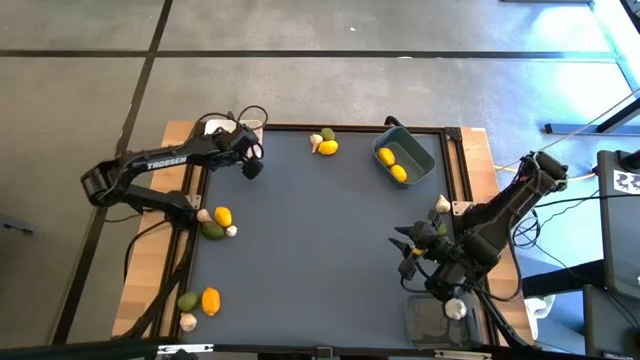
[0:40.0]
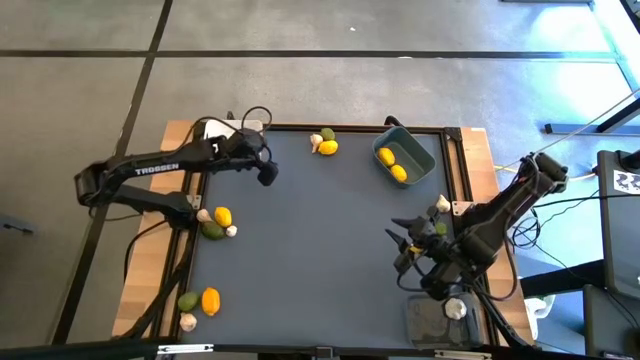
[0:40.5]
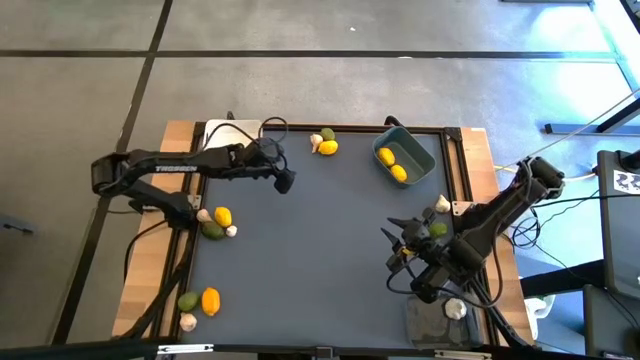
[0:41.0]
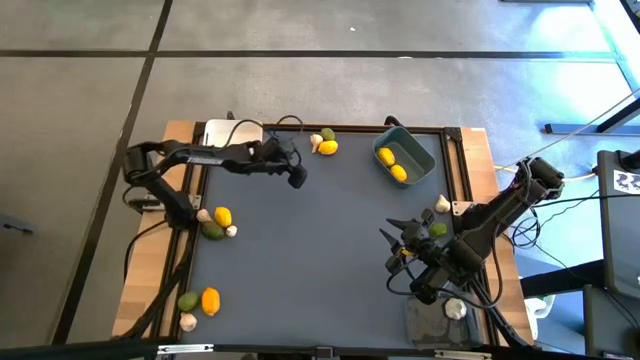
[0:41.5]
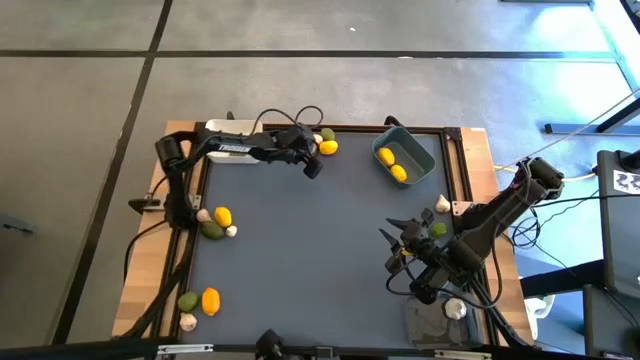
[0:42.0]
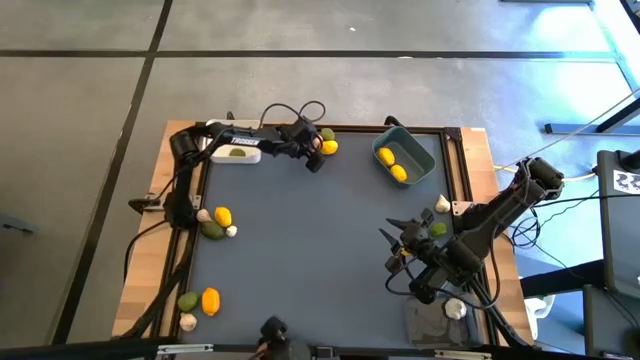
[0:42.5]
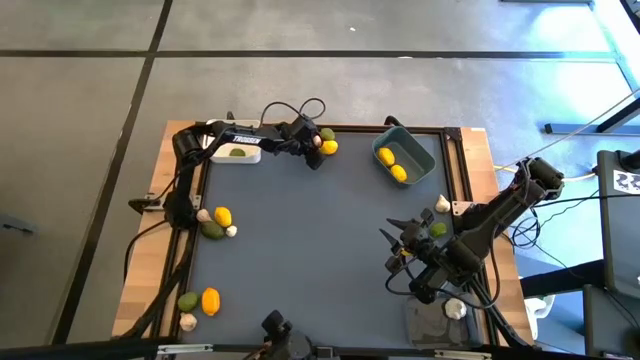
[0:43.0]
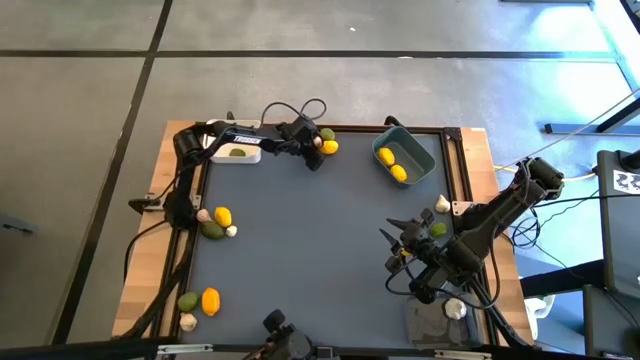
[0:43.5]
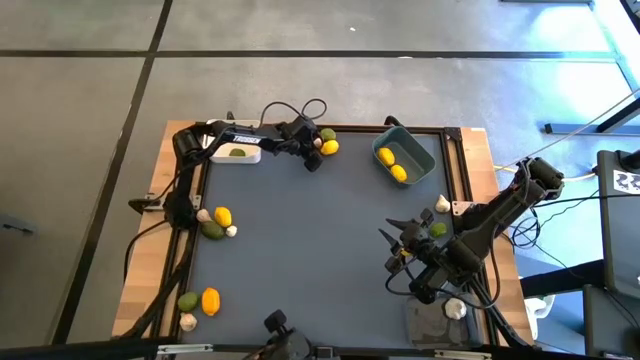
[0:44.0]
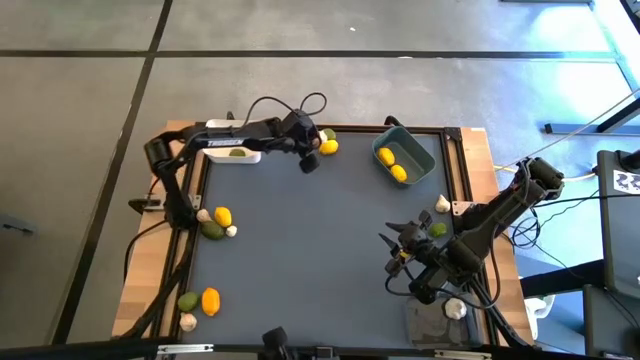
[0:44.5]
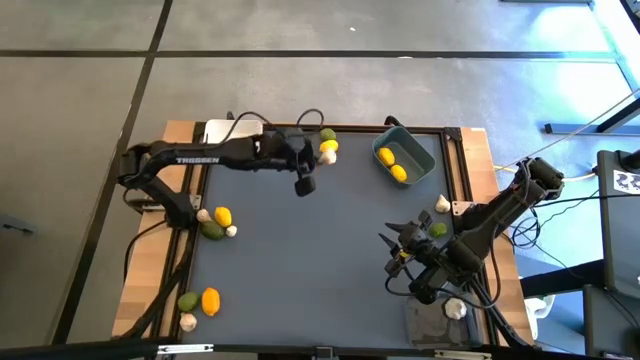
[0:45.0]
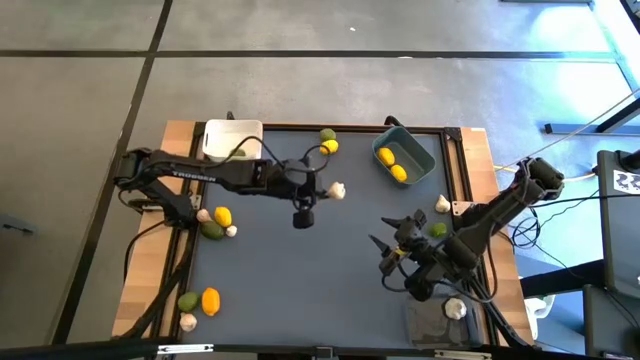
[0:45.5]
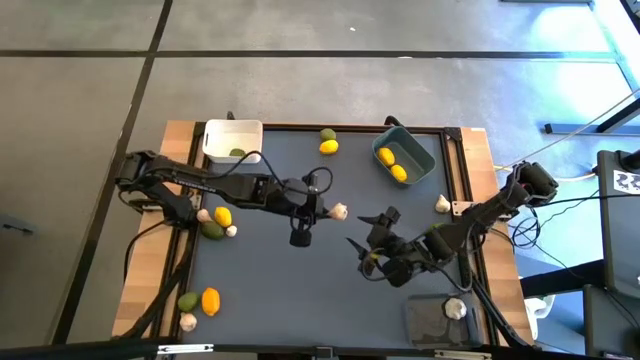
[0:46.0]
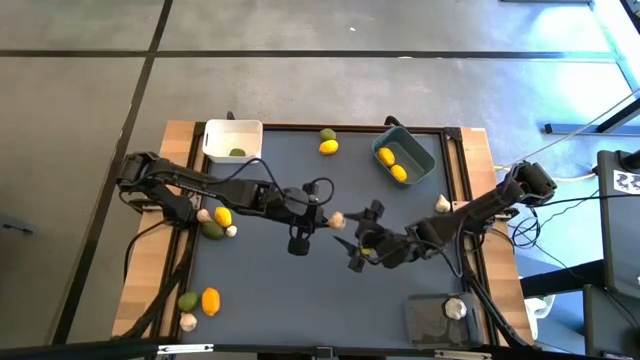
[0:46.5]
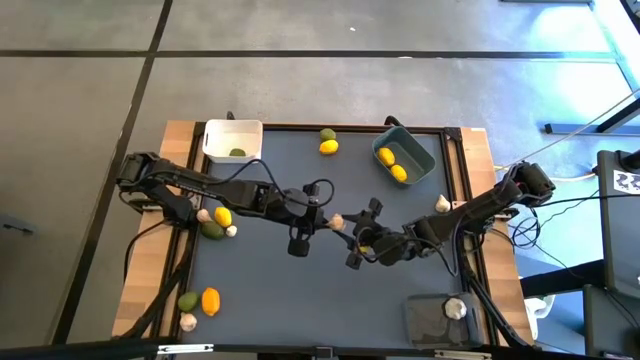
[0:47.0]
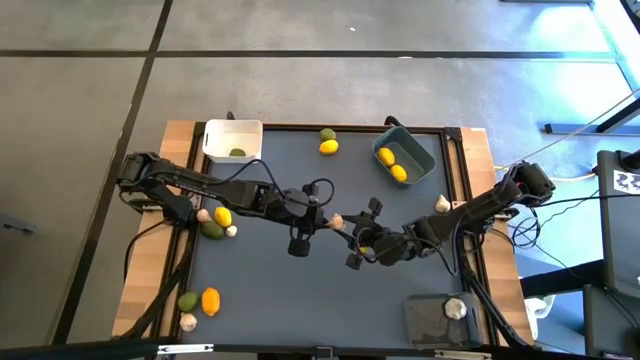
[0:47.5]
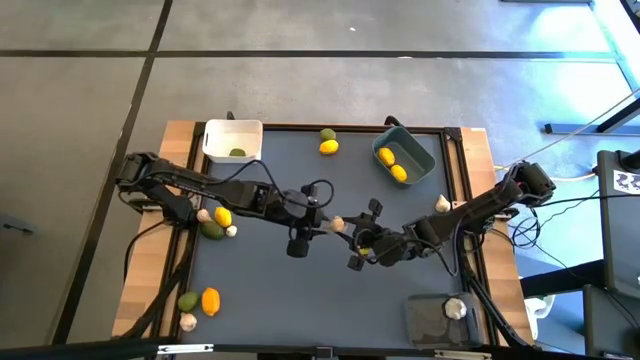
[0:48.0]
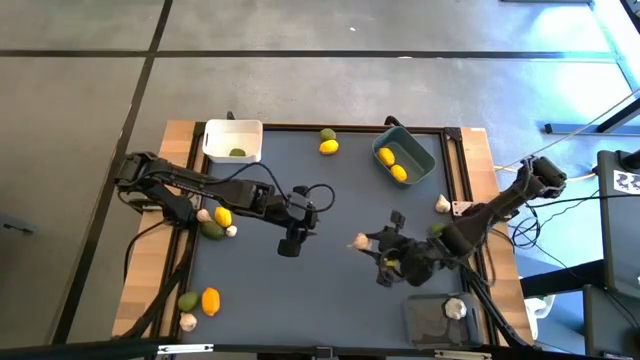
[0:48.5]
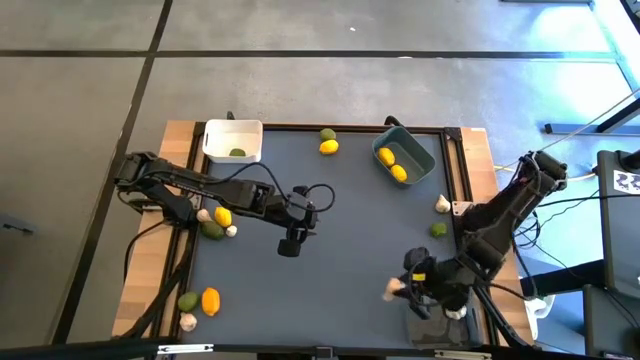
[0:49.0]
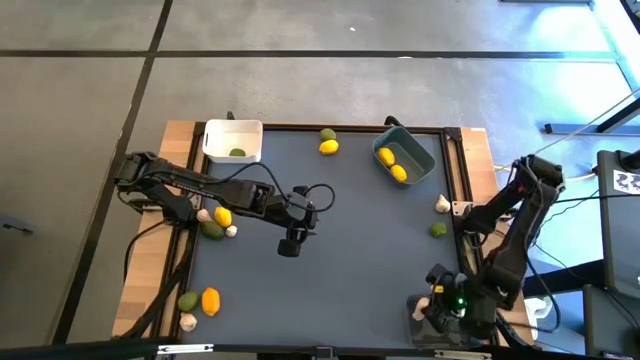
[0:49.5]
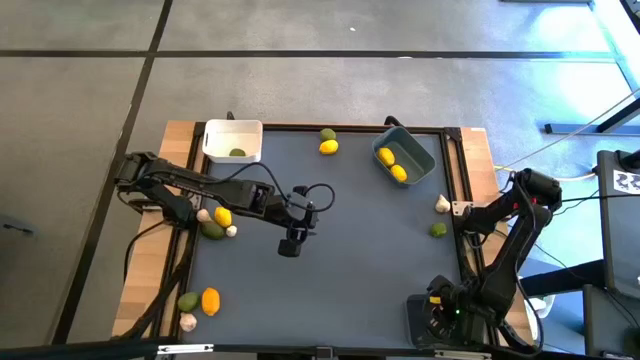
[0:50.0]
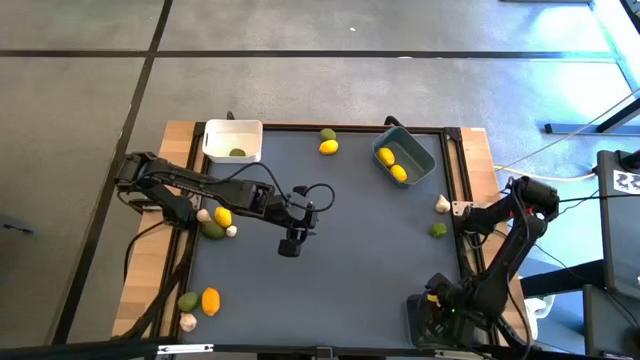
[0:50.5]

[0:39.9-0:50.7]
Task: Sort produce into baskets
Put the white garlic into the black bin

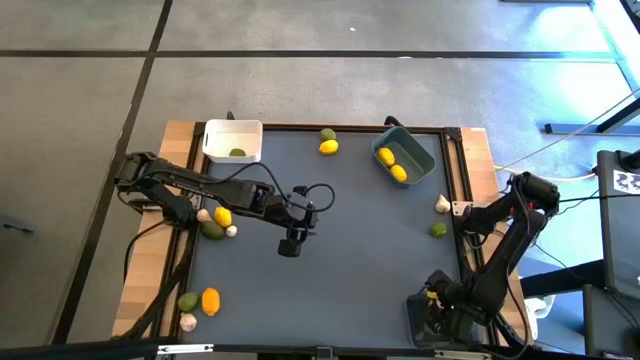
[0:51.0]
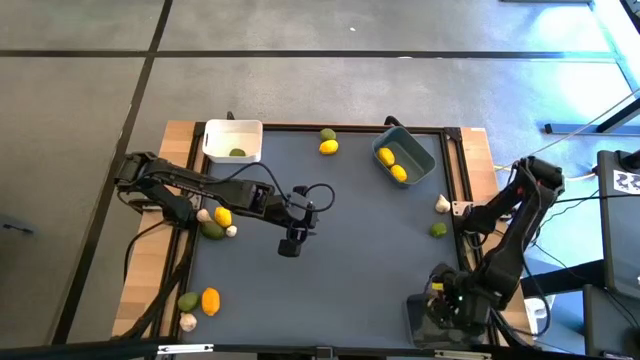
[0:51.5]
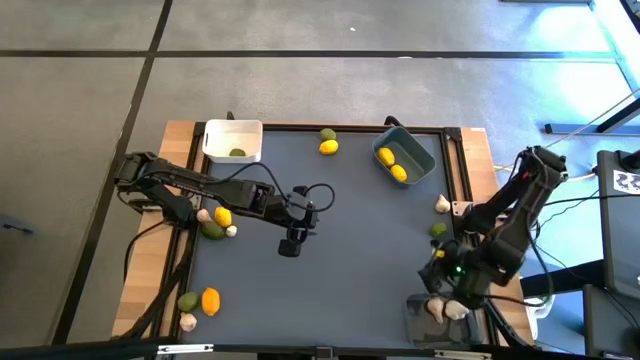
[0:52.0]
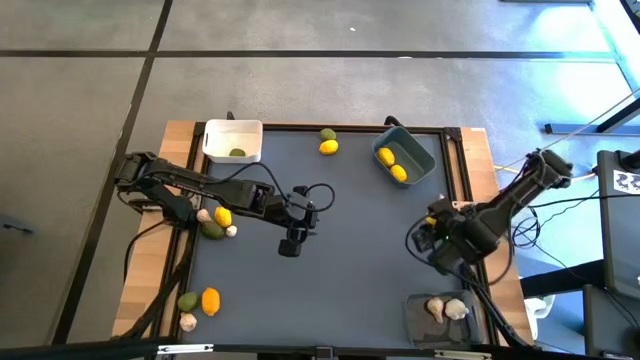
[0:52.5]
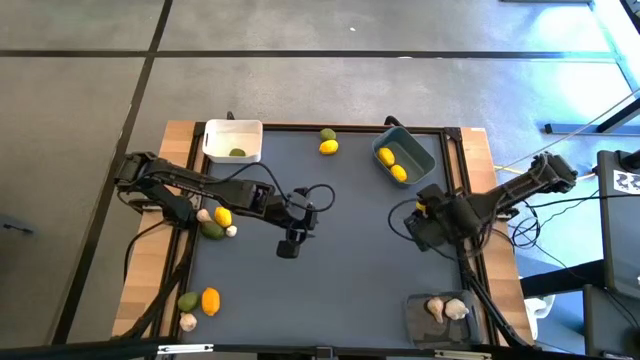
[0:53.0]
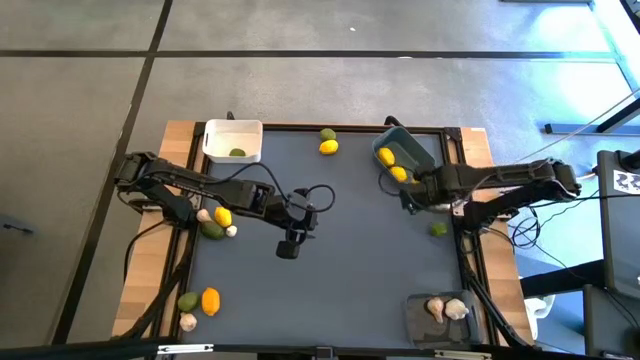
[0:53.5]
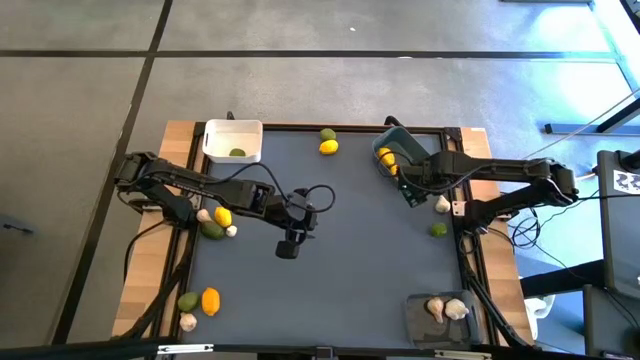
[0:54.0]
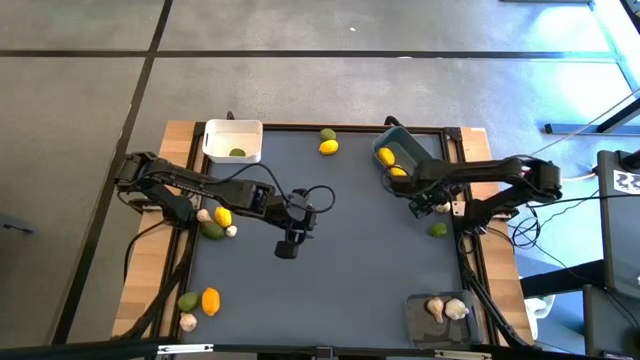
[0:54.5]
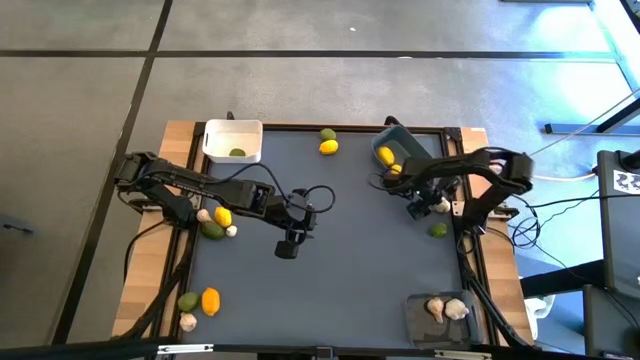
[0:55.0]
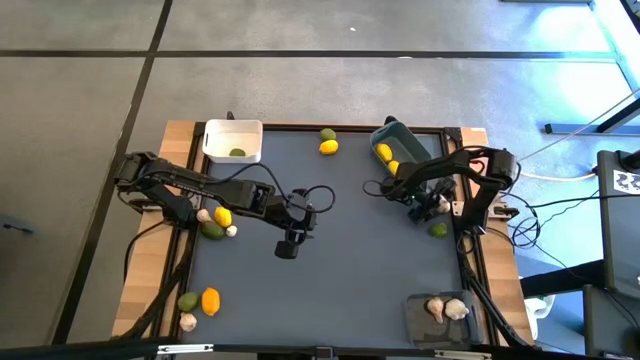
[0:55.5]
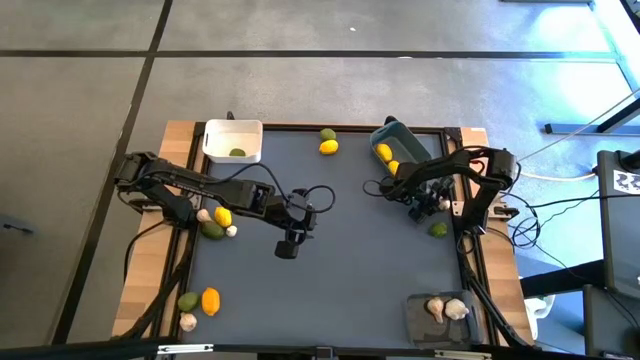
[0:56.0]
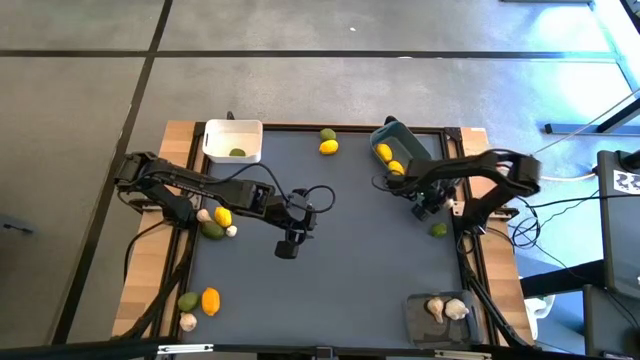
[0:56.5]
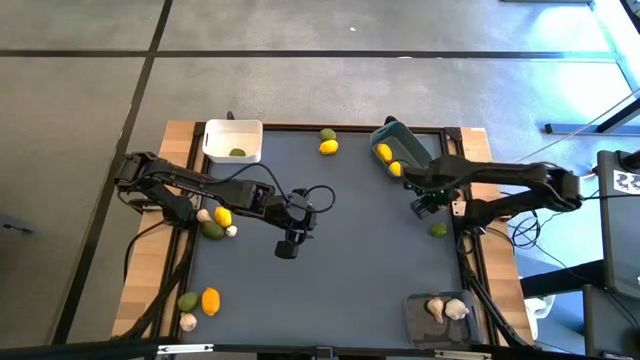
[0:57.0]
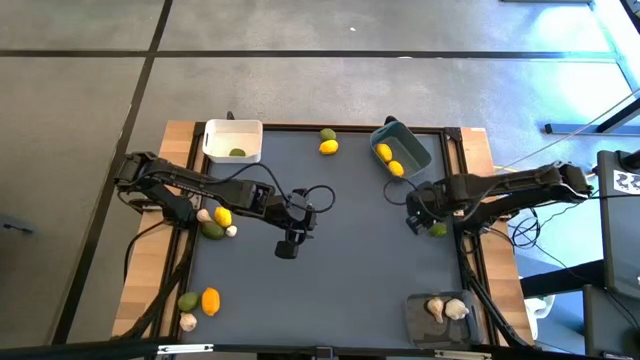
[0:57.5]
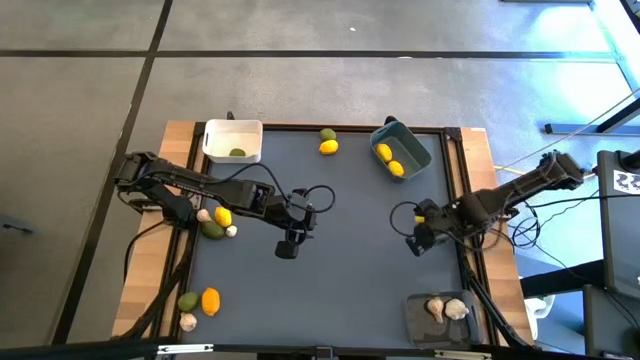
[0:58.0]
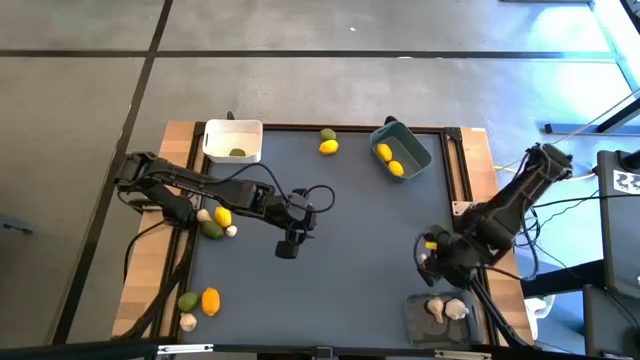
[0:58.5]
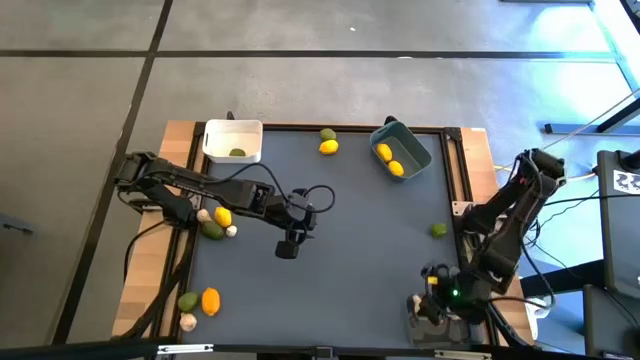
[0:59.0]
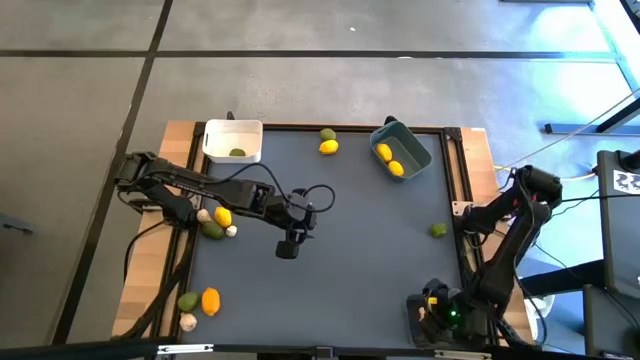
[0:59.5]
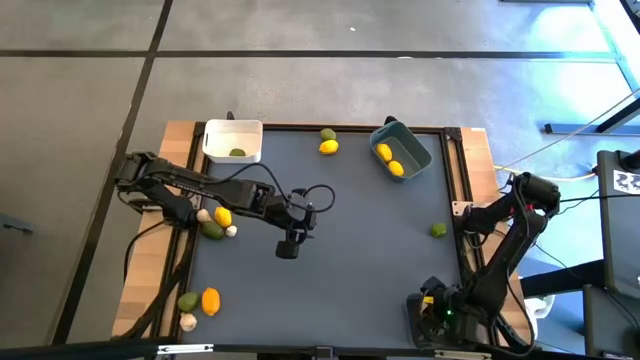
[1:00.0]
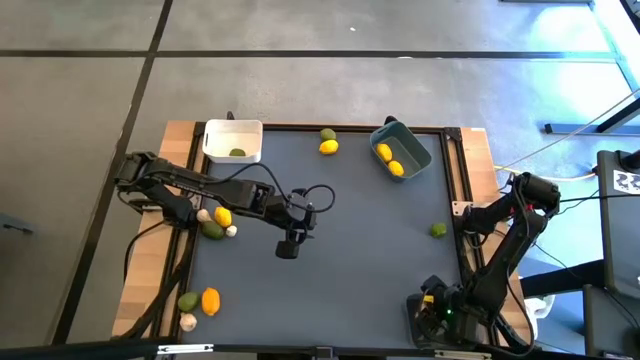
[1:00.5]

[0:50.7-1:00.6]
Put the white garlic into the black bin
